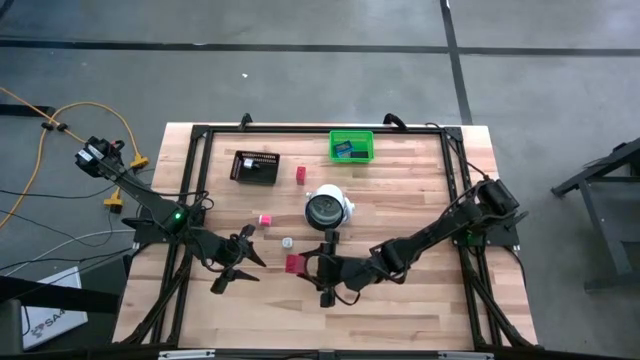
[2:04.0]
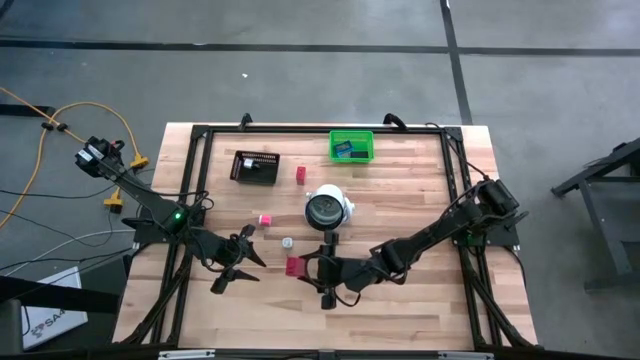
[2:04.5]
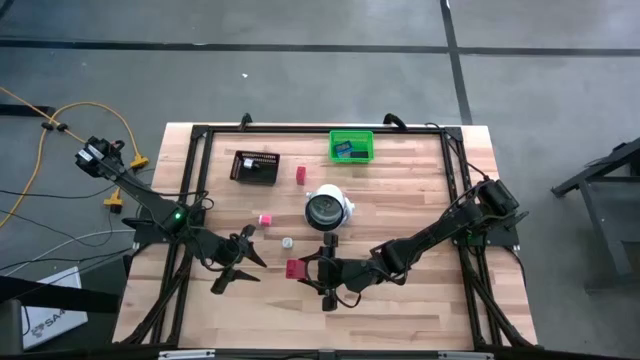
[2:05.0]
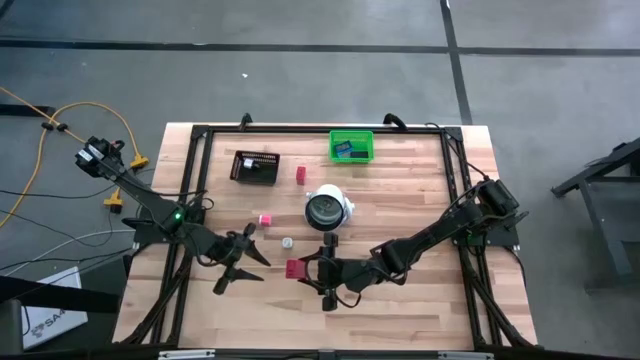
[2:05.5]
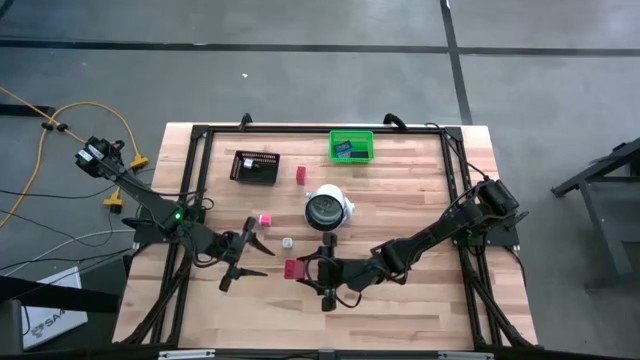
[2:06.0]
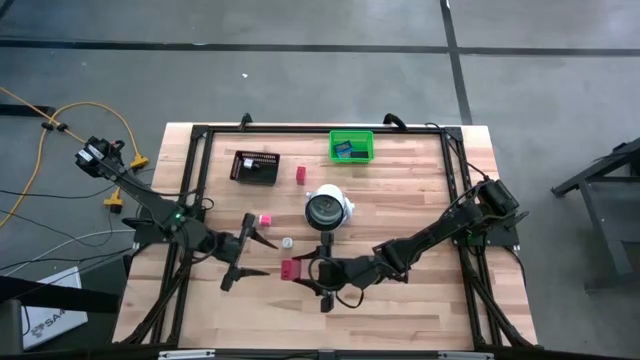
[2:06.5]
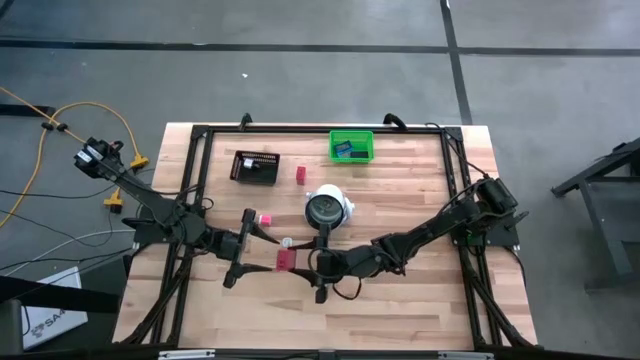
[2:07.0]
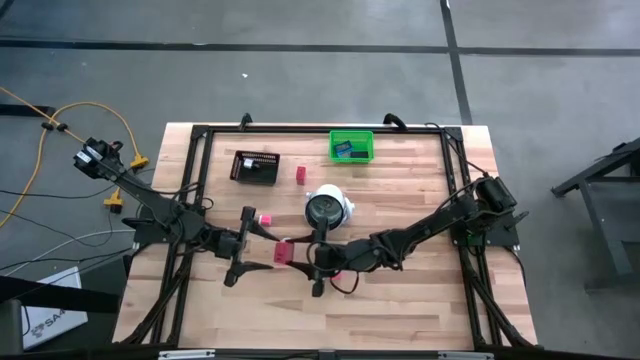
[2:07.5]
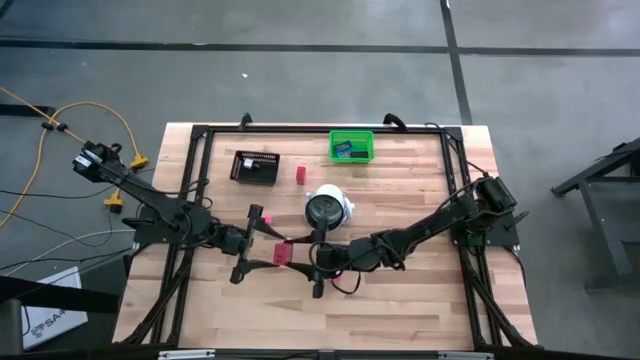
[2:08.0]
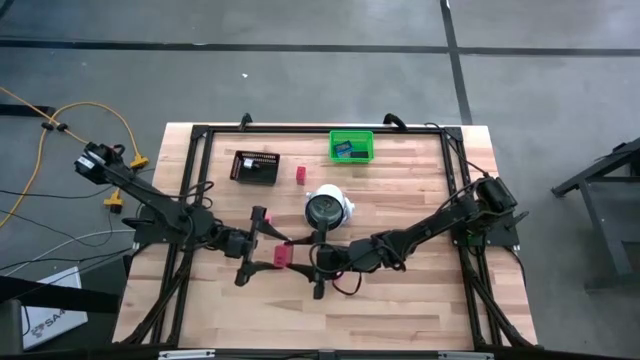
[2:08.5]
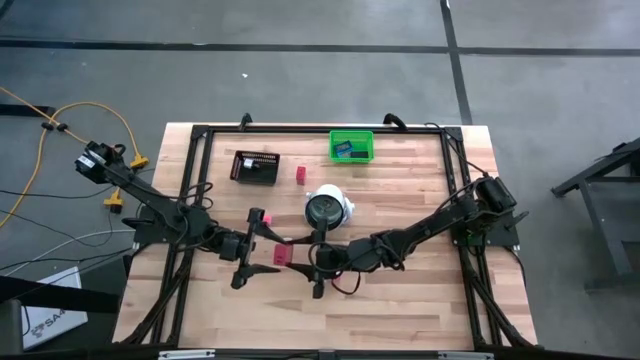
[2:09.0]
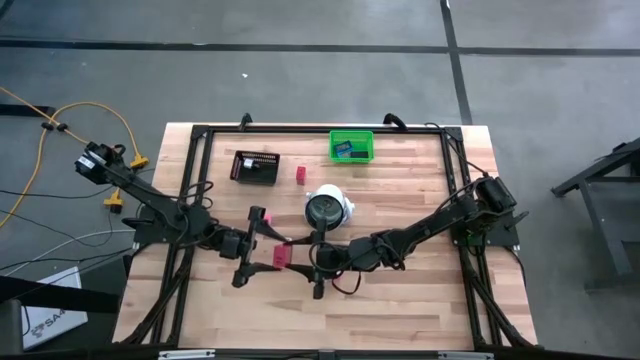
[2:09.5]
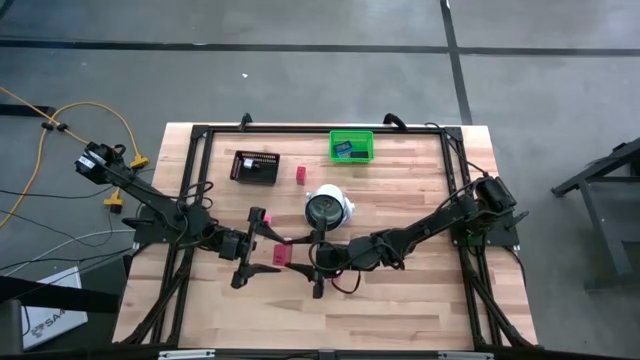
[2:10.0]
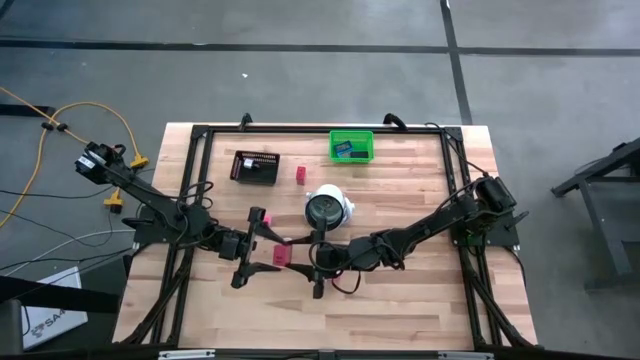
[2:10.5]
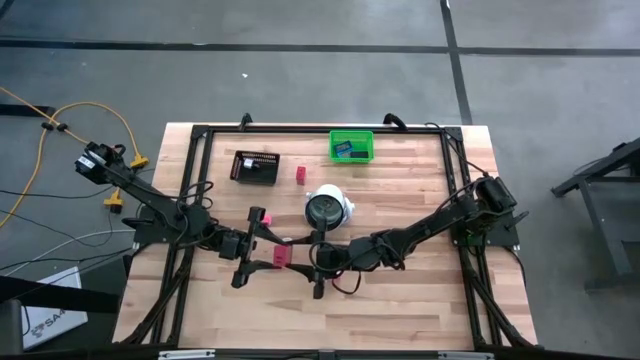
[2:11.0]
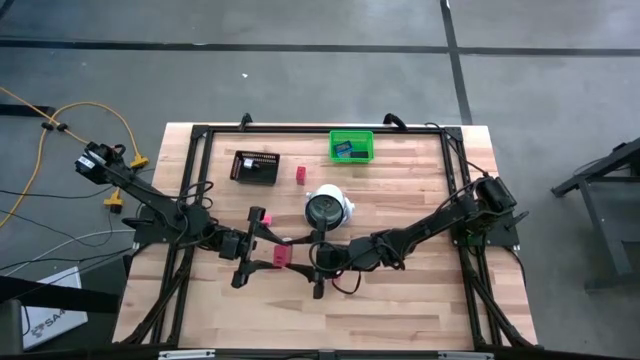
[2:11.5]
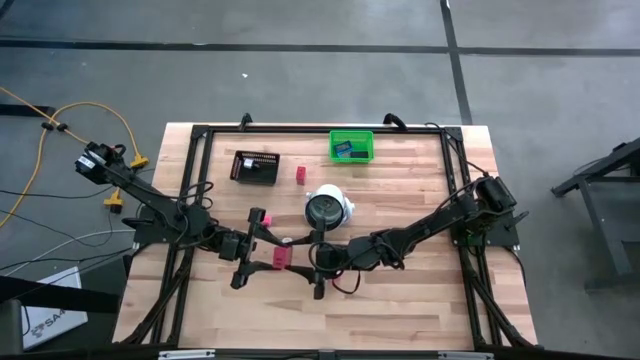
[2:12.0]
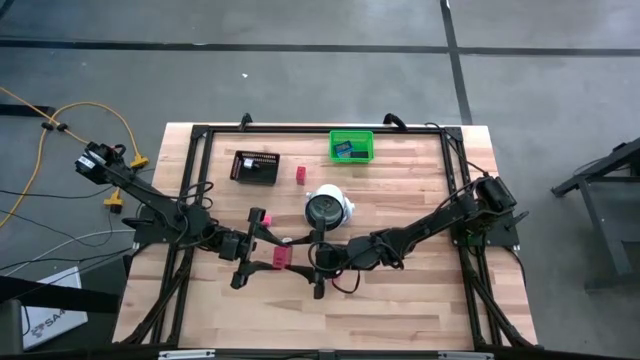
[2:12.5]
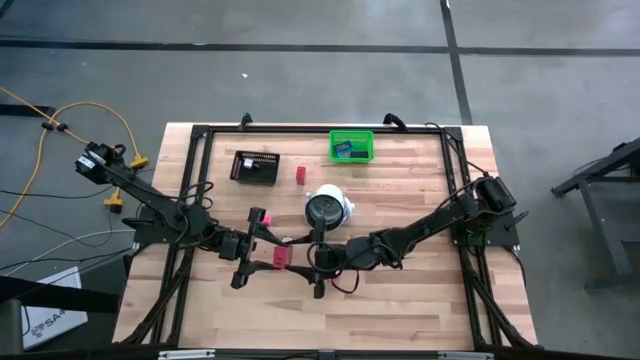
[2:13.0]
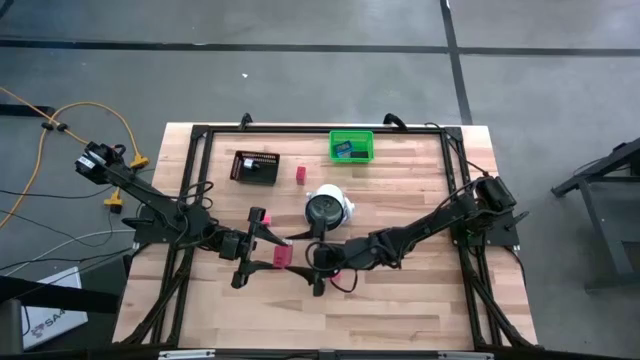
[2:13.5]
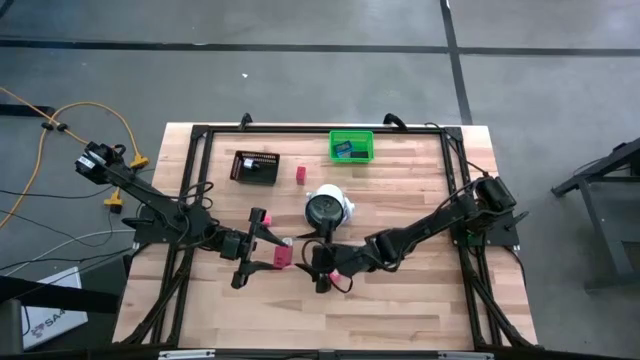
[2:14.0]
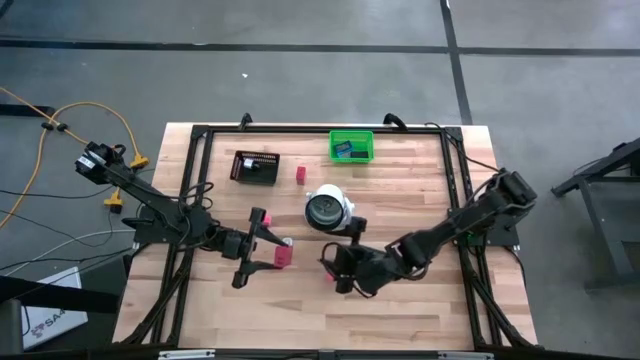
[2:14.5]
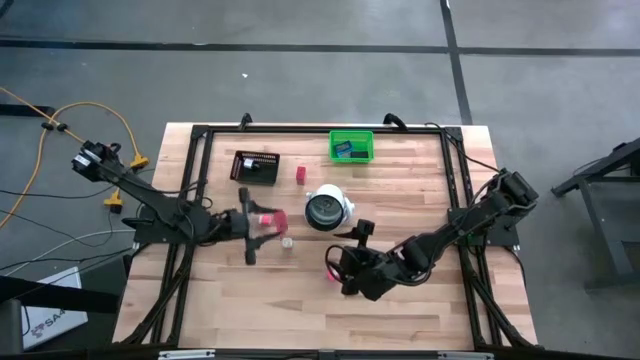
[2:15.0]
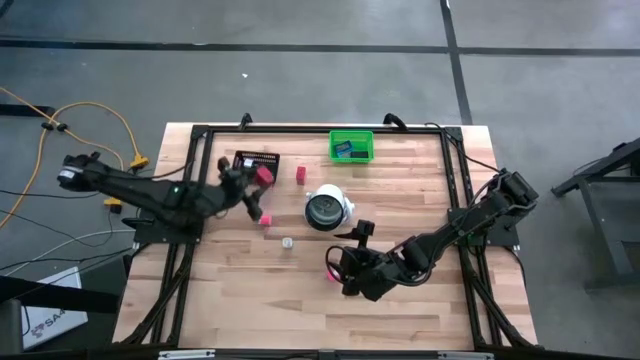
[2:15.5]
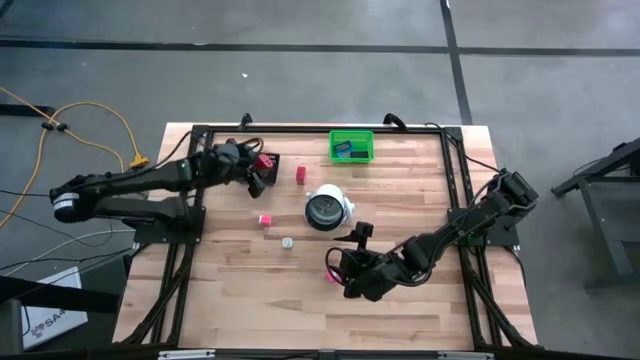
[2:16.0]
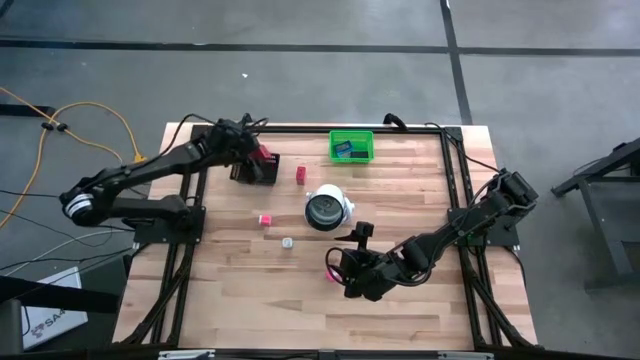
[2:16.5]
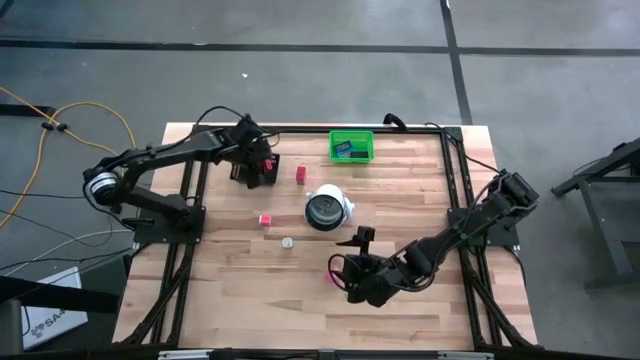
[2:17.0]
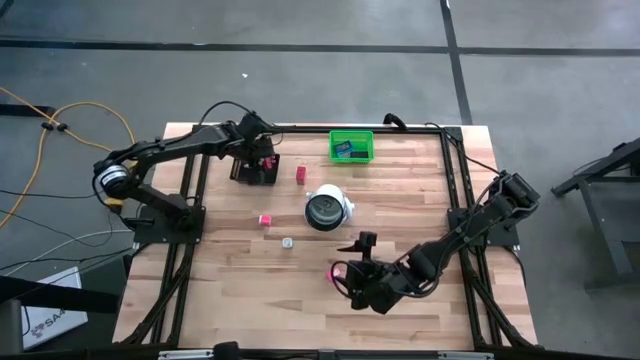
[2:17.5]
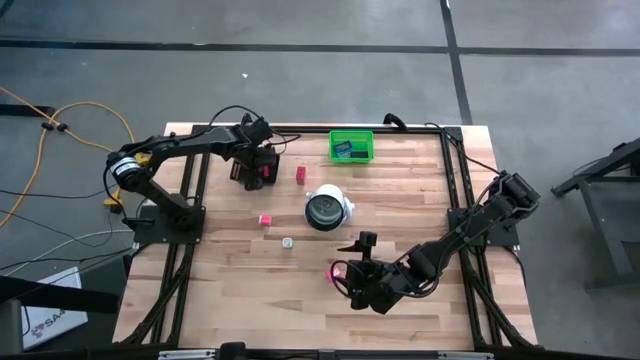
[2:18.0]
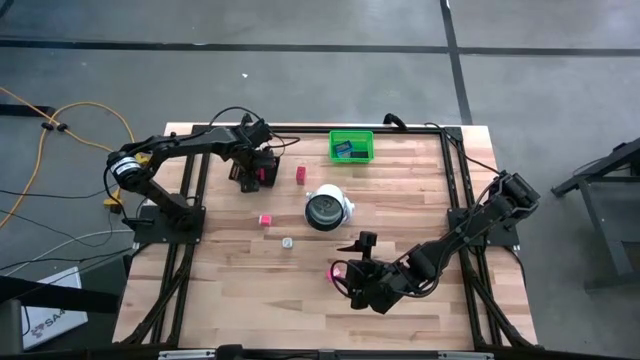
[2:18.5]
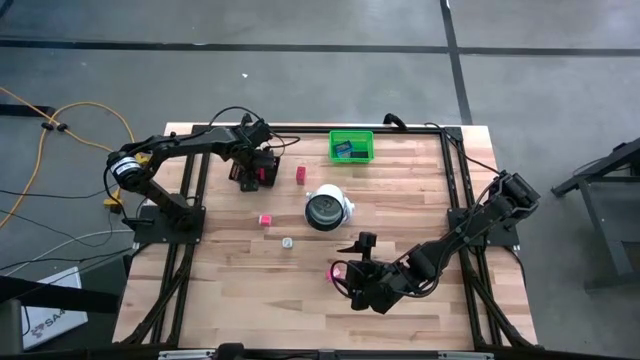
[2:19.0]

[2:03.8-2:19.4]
Task: Pick & Place Office items
Put the bottom red charger adapter into the black bin

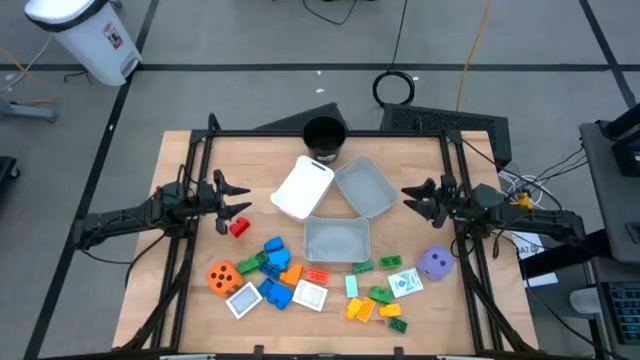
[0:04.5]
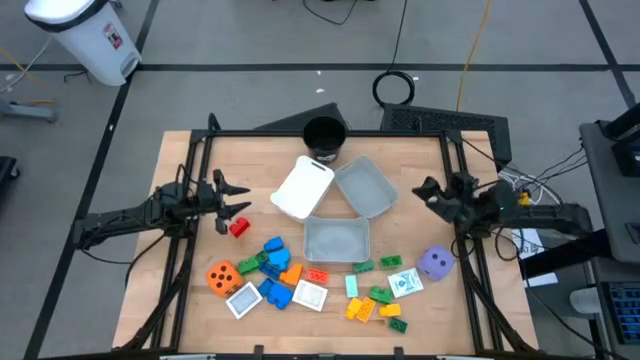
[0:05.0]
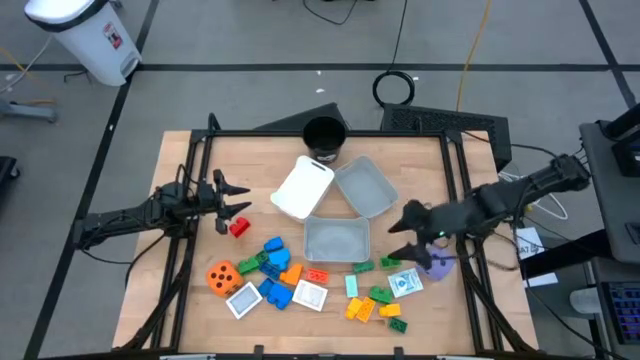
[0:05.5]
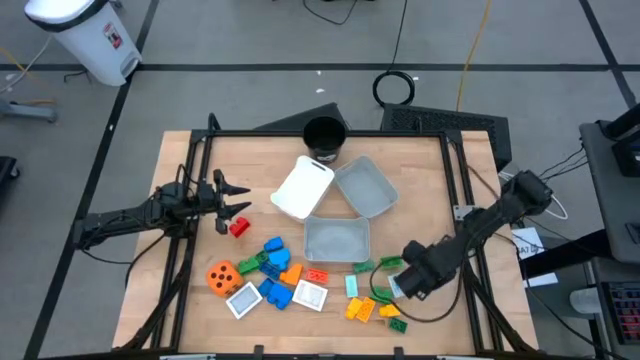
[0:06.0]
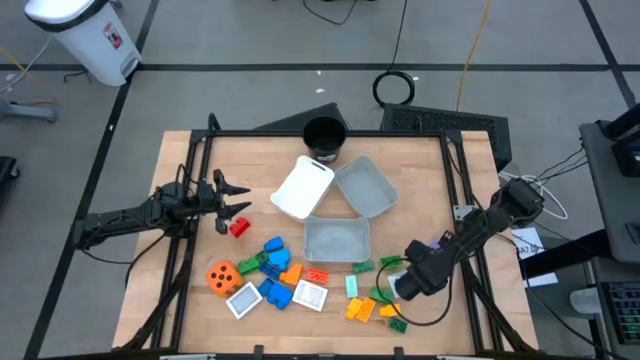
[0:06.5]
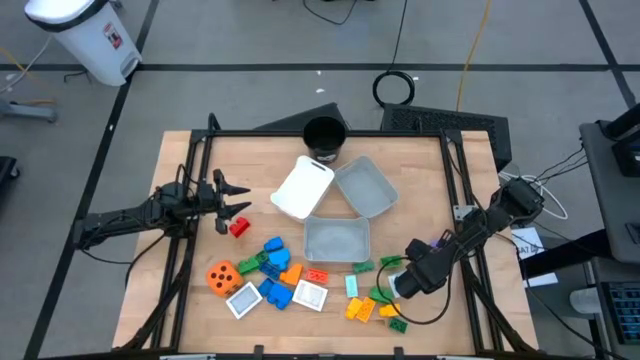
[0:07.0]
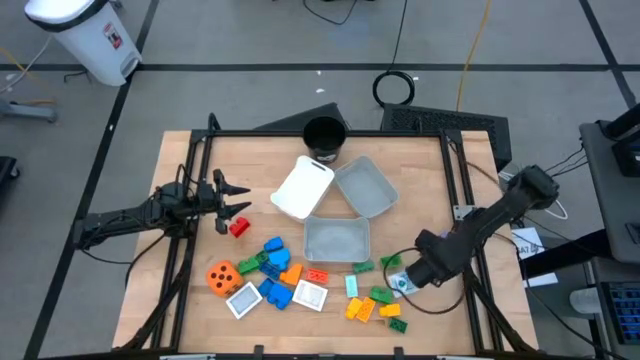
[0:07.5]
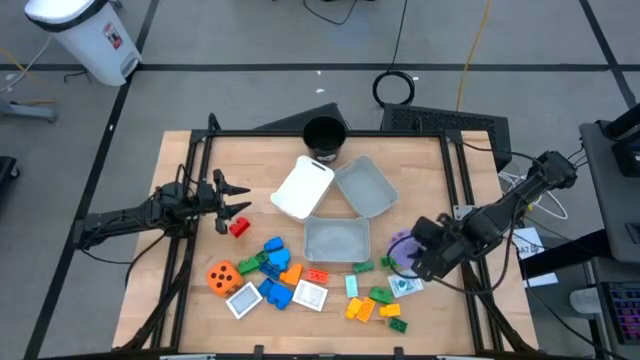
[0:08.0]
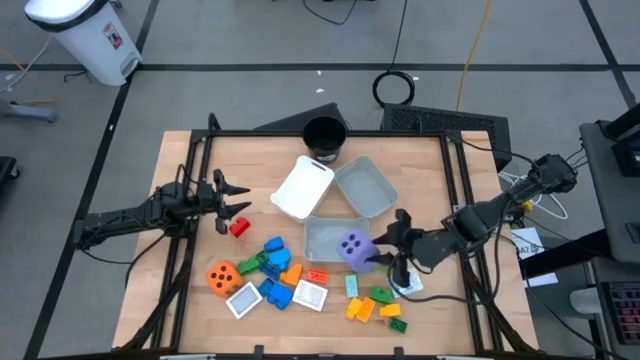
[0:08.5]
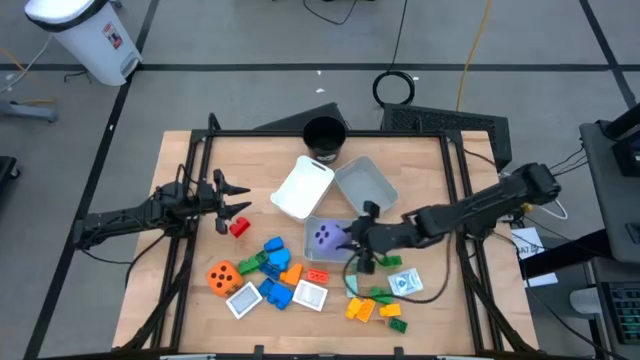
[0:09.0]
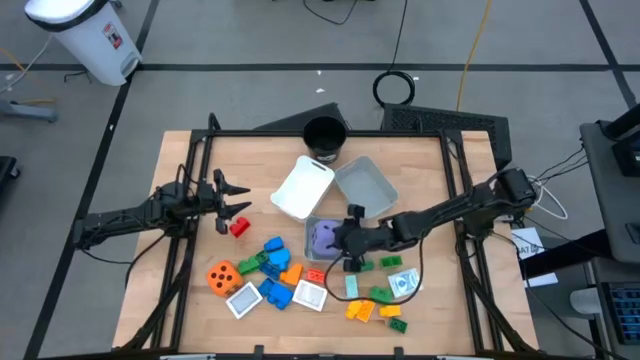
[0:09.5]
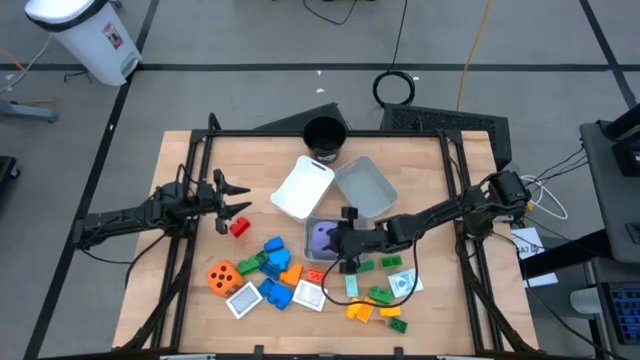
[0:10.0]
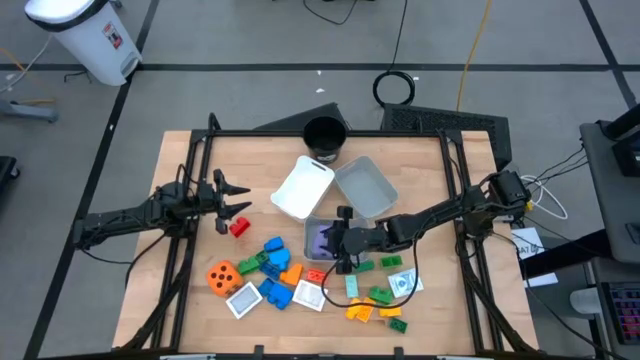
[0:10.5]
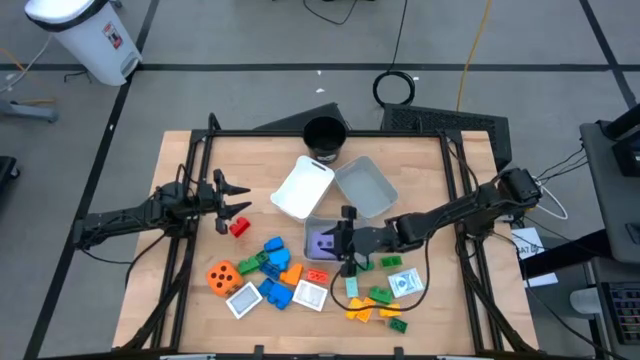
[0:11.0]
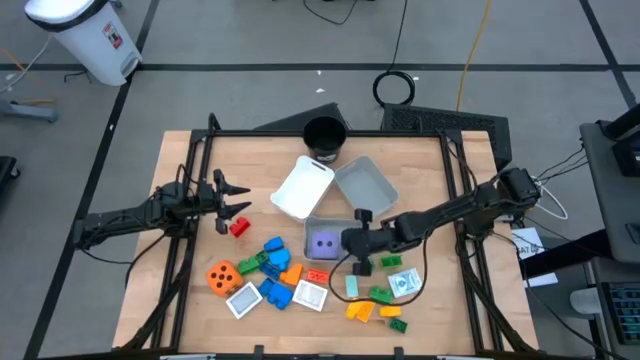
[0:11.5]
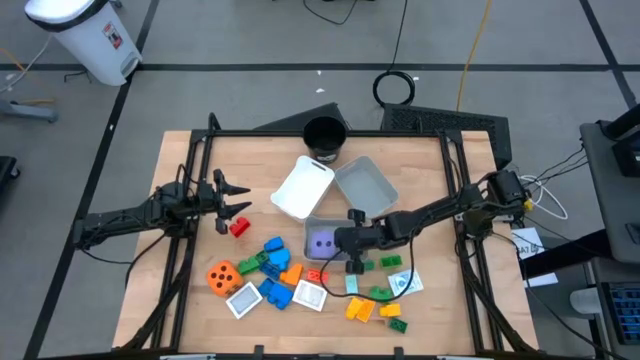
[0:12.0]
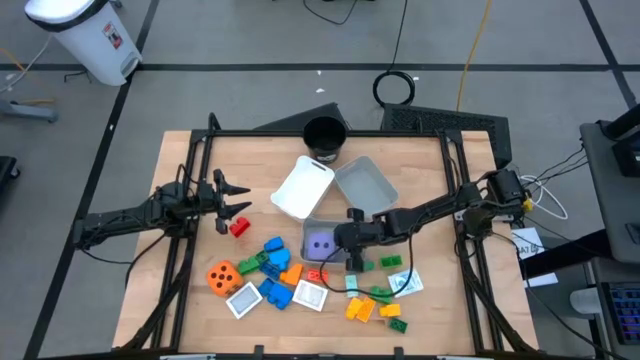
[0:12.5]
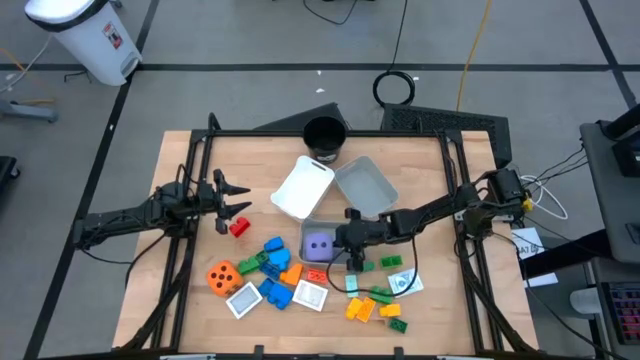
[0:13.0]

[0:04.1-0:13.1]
Task: Pick & Place Toys
Put the purple die into the bottom gray bin
